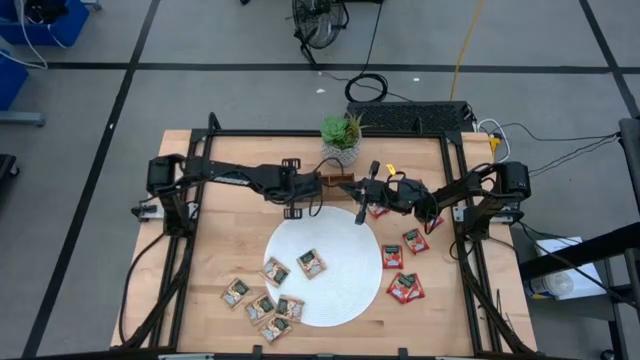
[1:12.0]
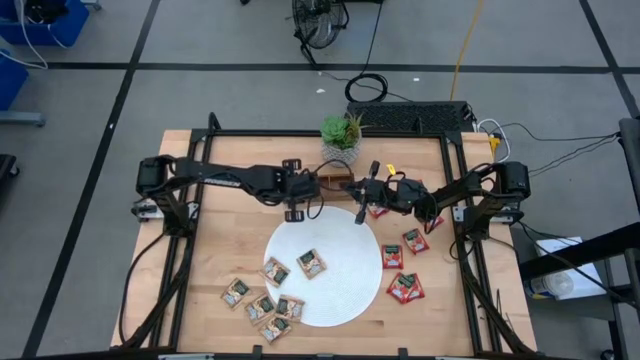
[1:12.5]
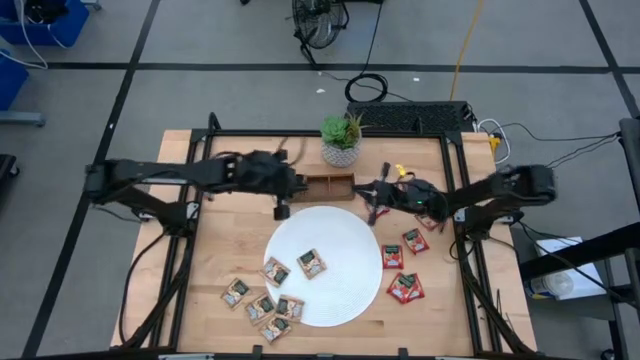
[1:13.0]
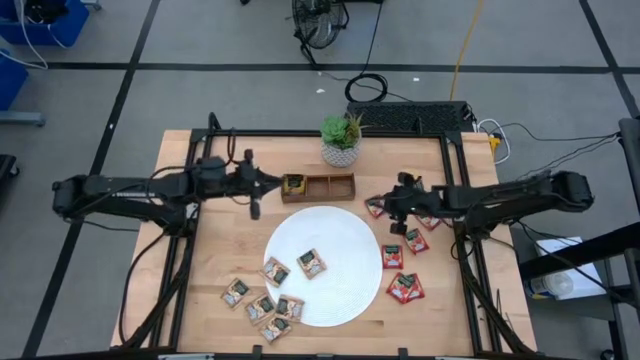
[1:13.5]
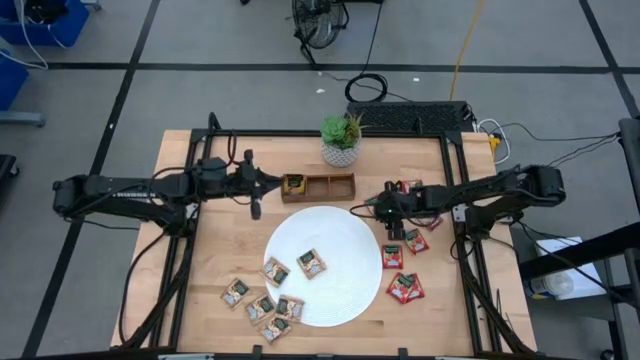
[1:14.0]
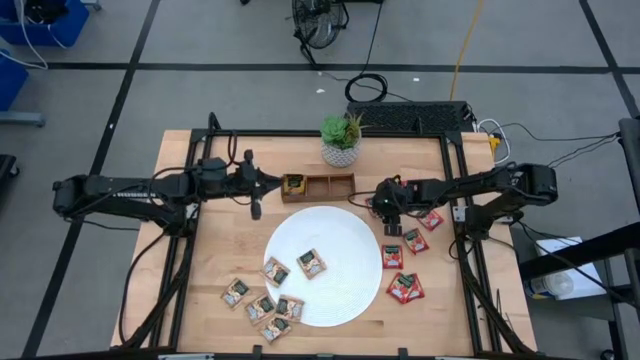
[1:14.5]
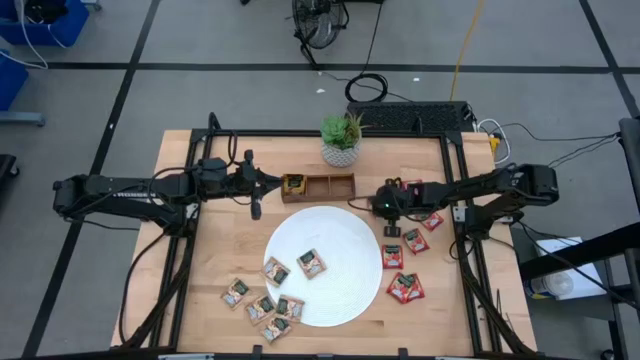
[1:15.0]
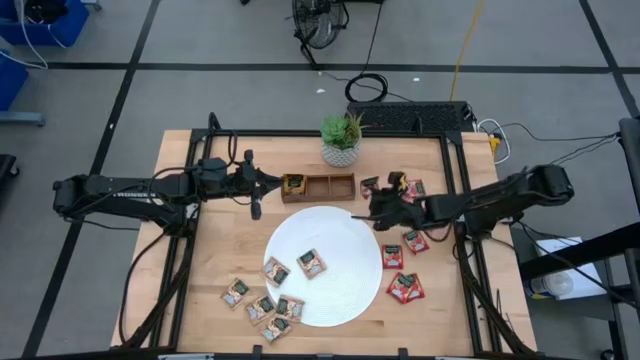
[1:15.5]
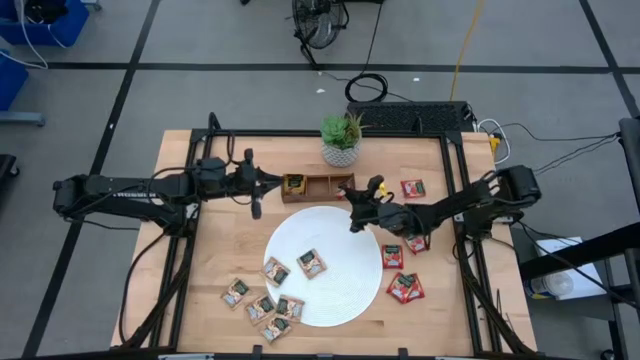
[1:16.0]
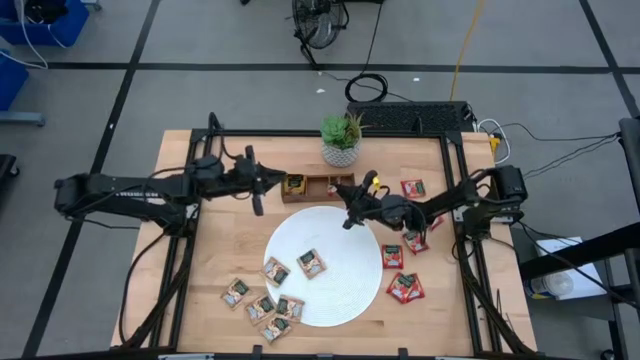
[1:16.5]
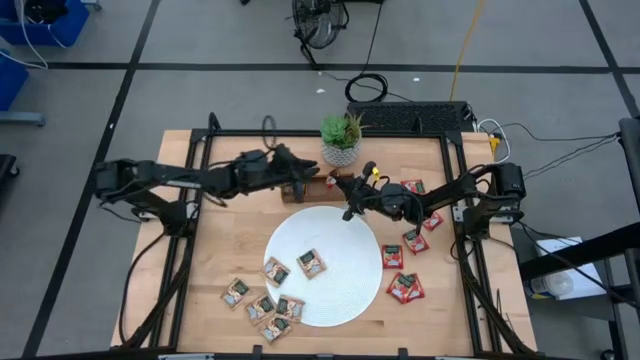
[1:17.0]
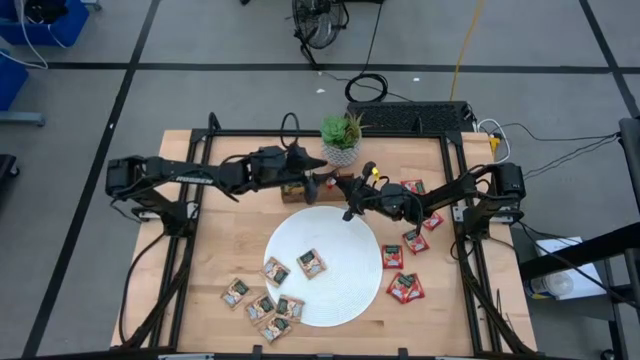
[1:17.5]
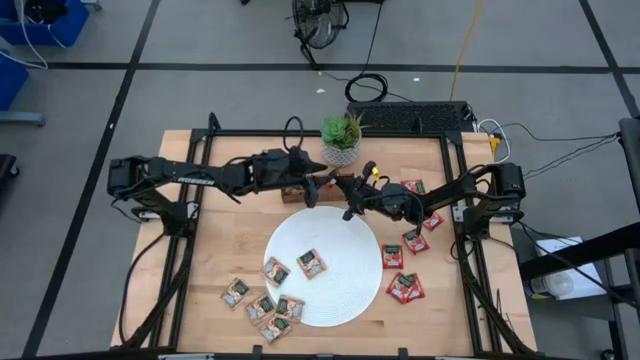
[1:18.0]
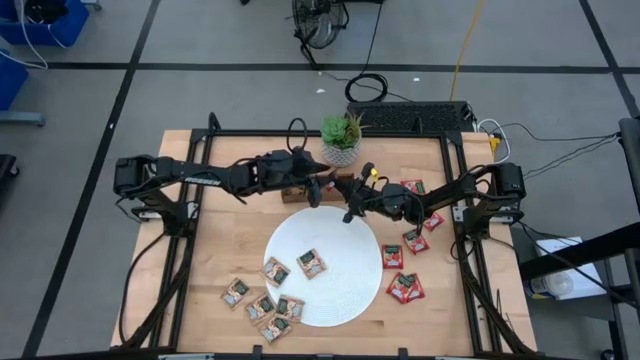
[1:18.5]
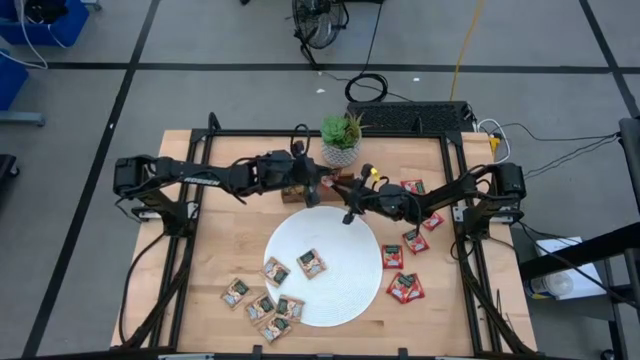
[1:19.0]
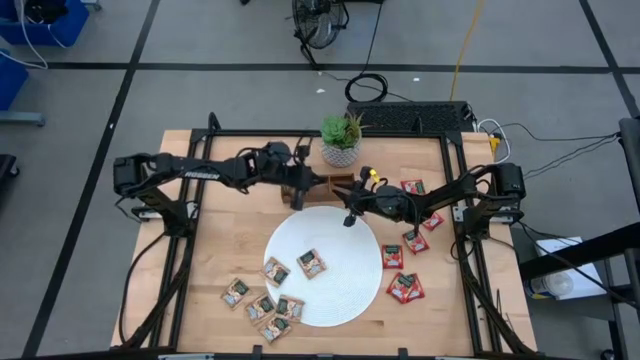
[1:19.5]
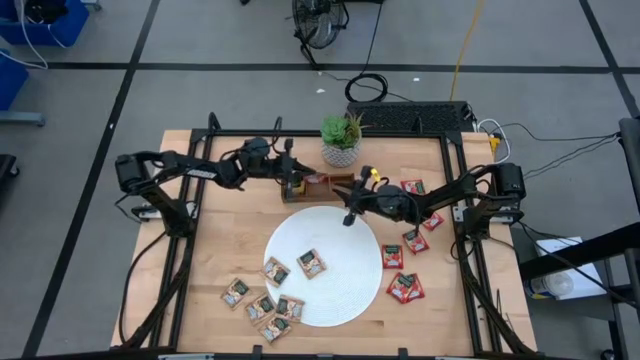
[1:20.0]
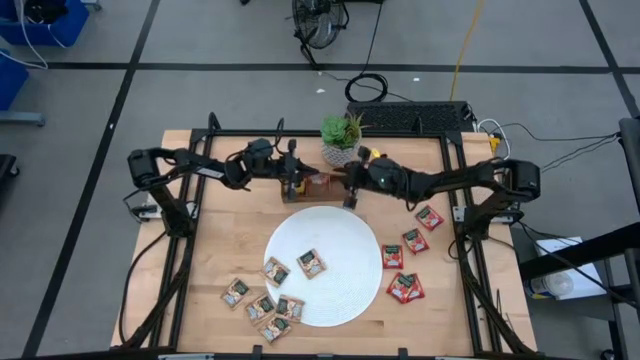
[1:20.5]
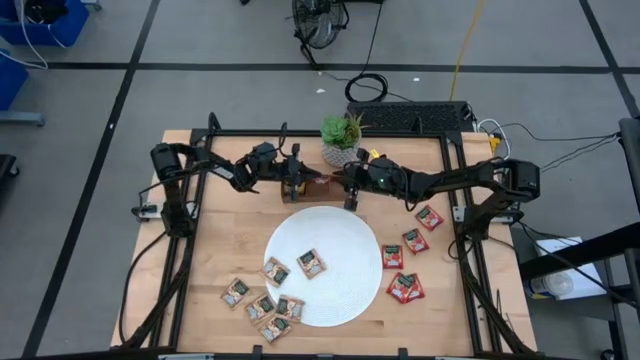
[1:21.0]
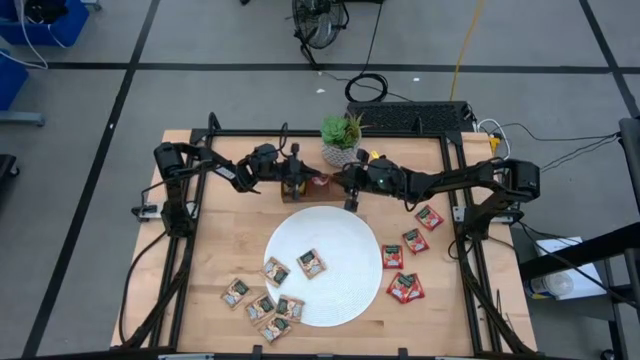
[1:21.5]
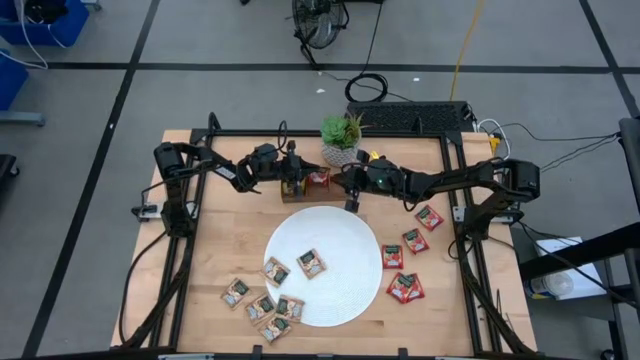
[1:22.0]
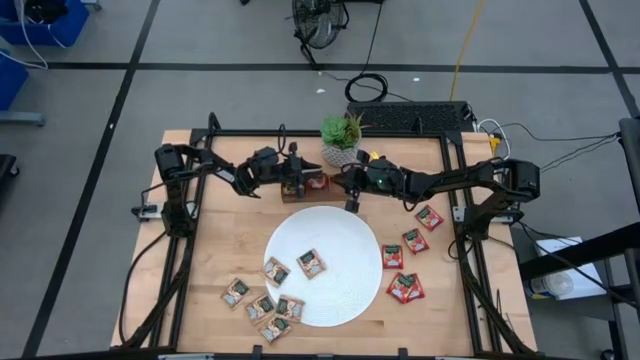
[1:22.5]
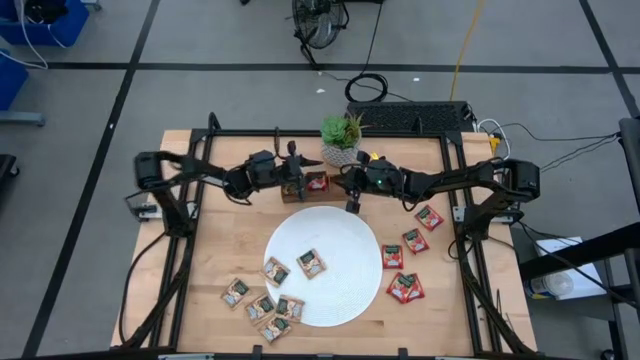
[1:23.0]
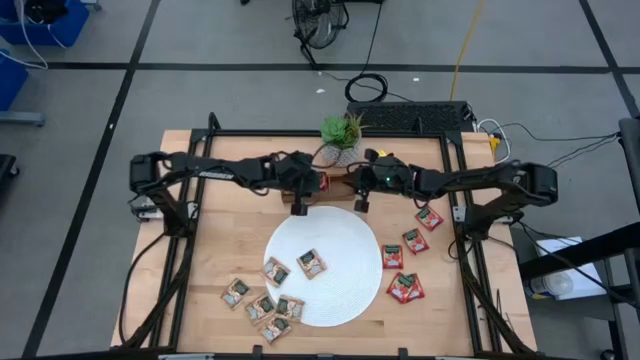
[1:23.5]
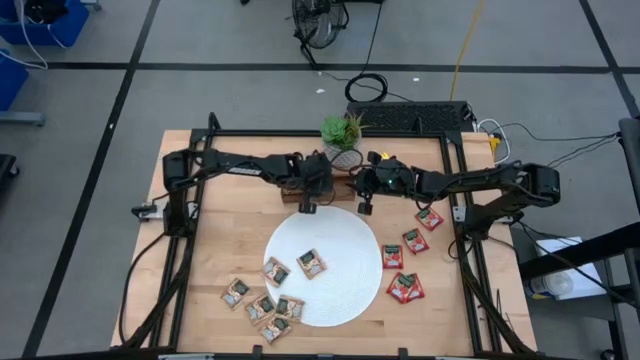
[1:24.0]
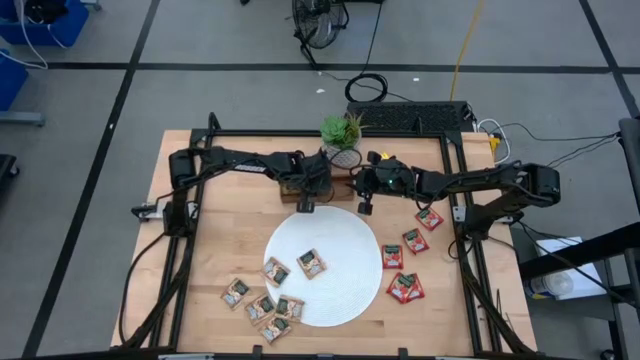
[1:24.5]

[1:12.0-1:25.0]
Task: Pick & Place Tea
Put the strawberry tea bag into the wooden organizer

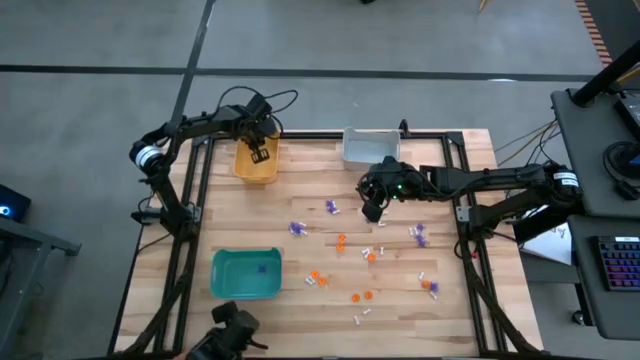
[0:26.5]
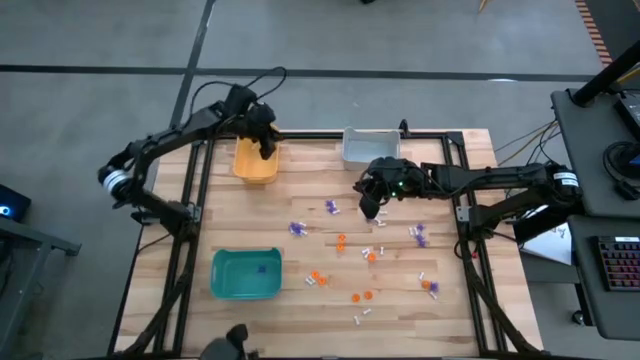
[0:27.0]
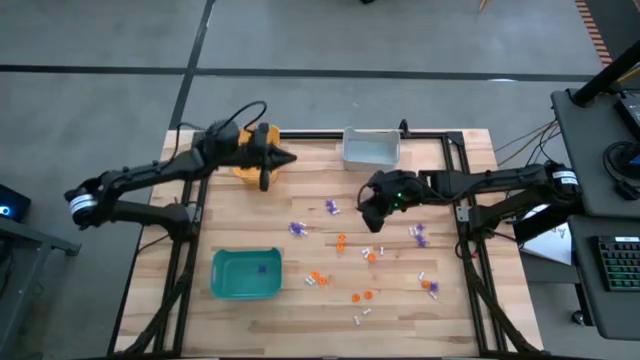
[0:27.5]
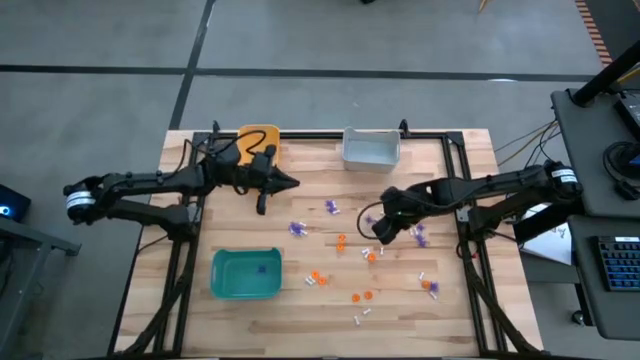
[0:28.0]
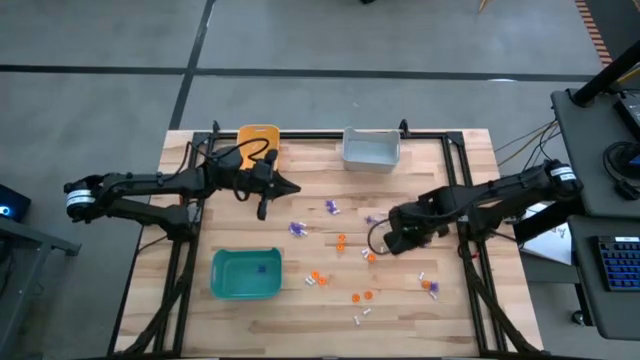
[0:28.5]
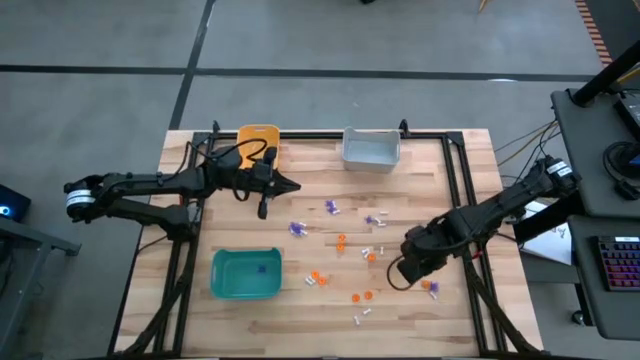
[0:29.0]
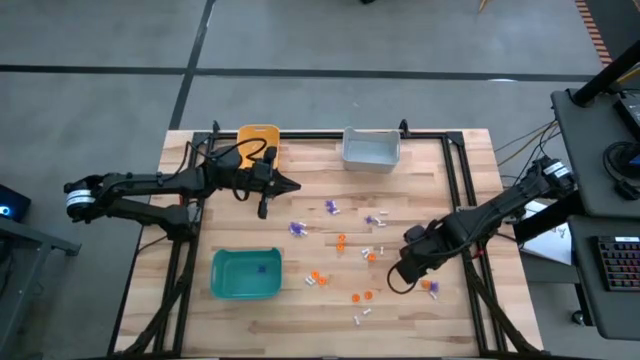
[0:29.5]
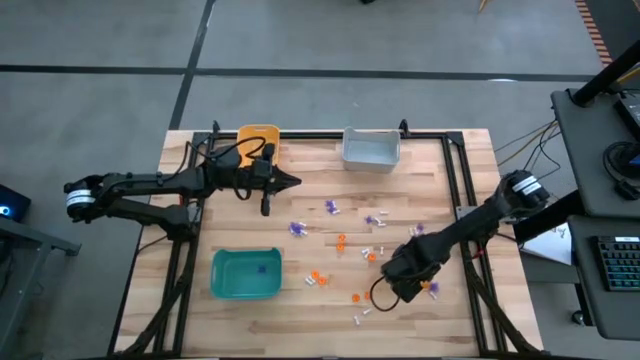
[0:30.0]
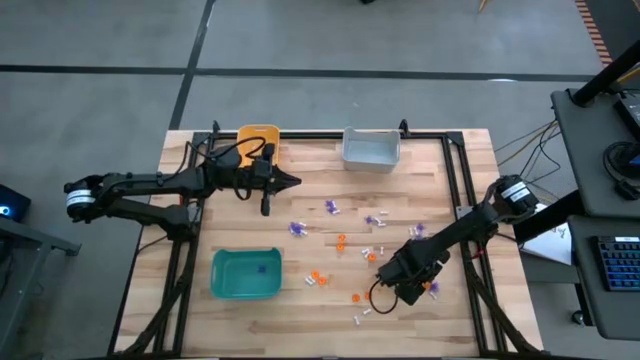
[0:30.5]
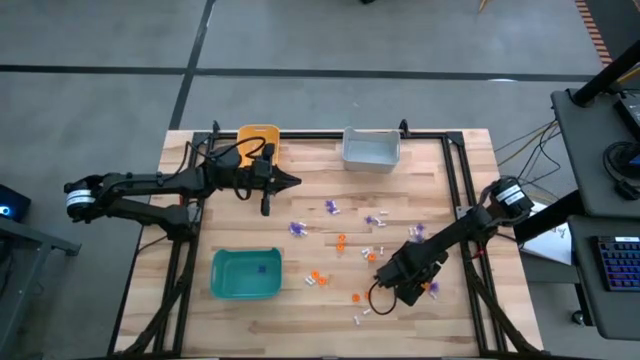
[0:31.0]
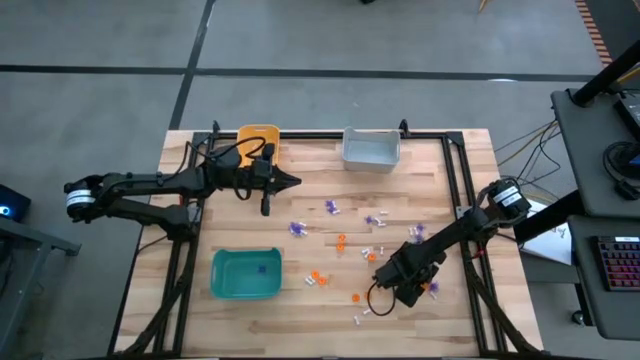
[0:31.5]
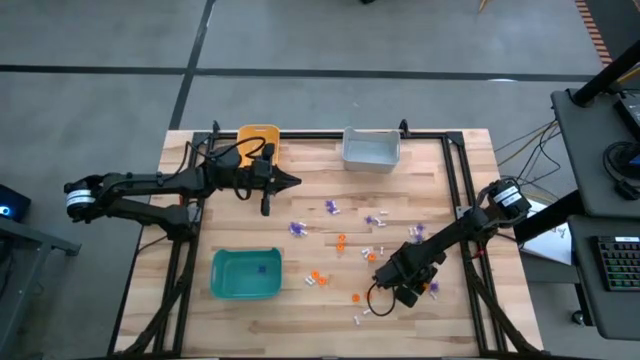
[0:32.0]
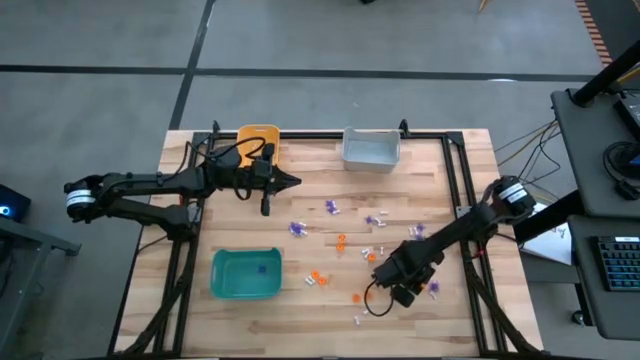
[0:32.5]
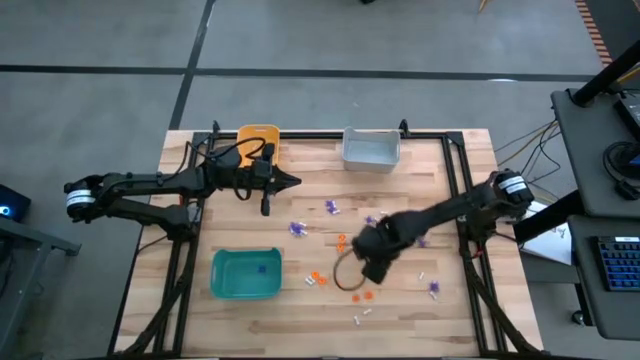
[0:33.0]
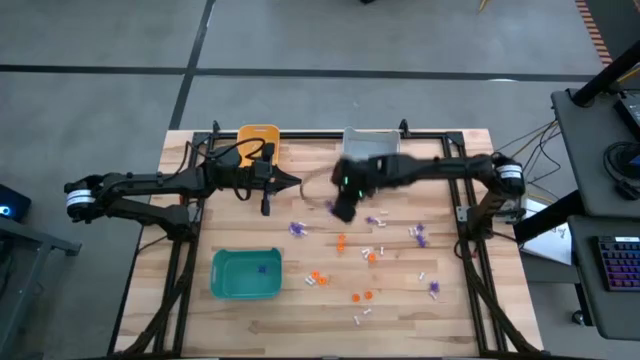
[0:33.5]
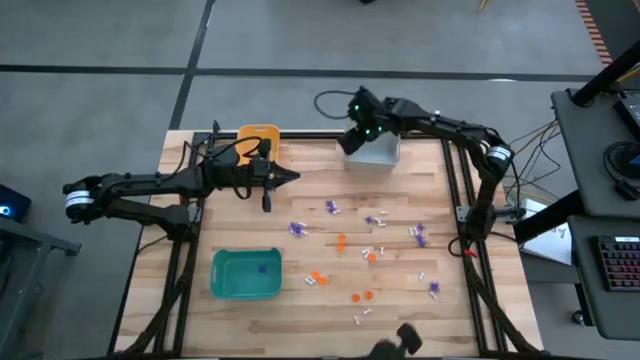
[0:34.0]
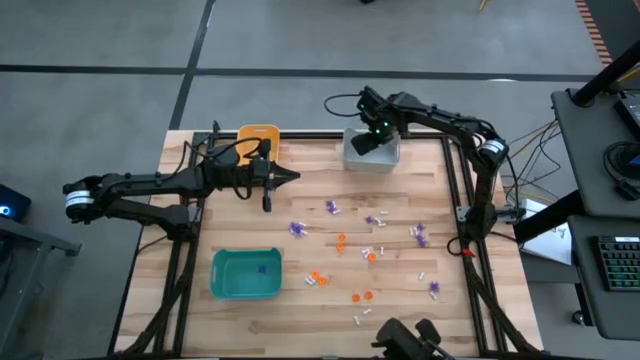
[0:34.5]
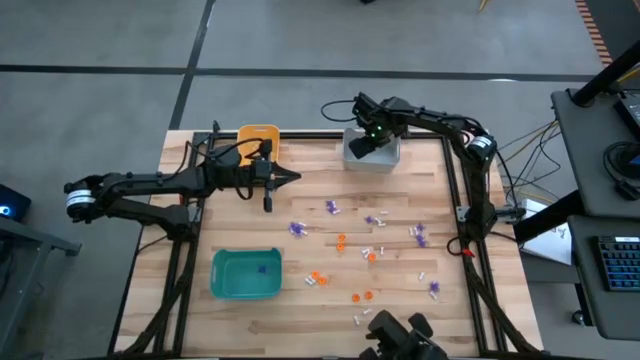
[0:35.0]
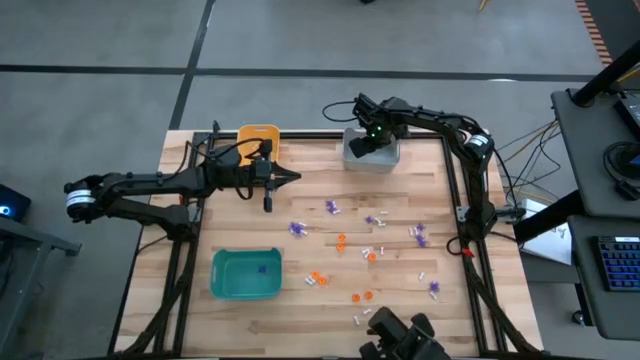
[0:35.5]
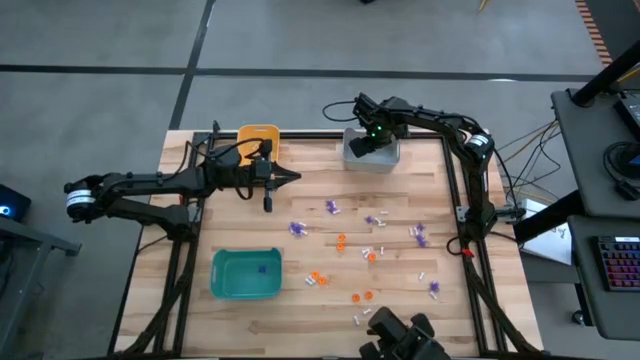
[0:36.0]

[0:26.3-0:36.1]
Task: Sort Halloween decoration
Put the orange pumpkin toy into the gray bin
